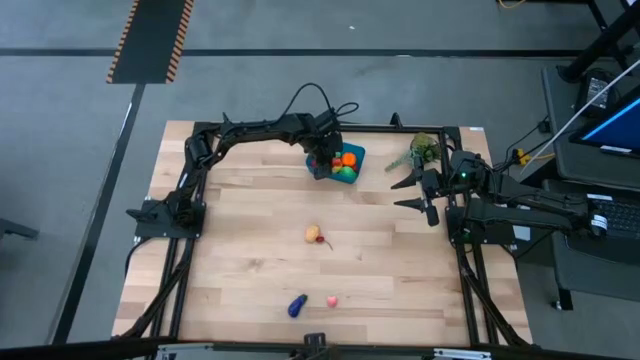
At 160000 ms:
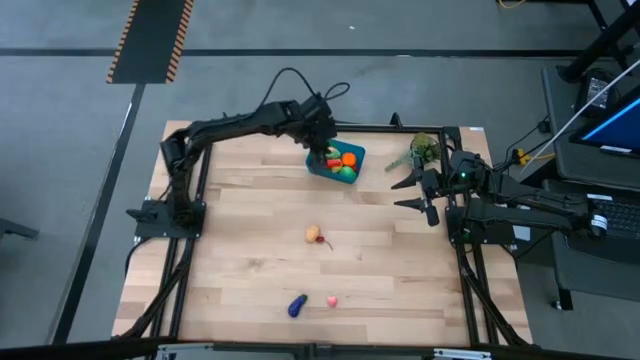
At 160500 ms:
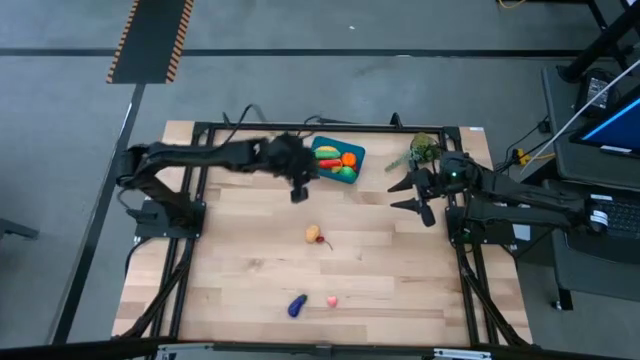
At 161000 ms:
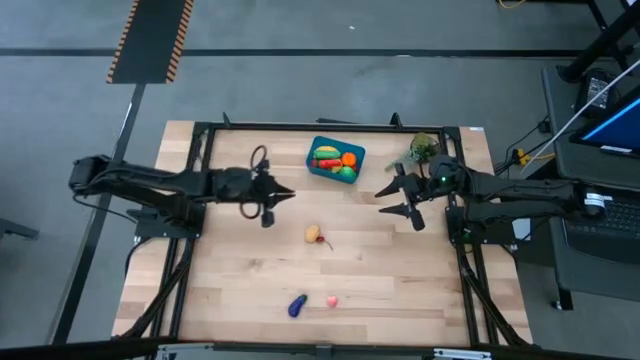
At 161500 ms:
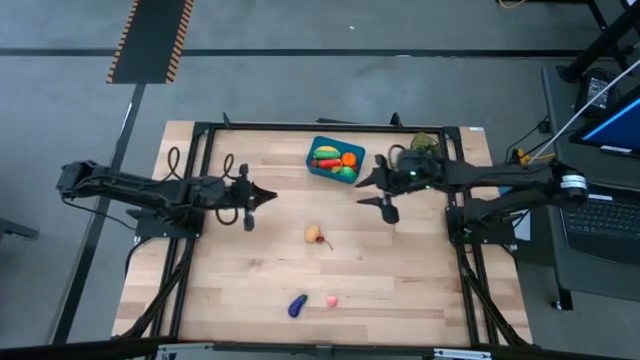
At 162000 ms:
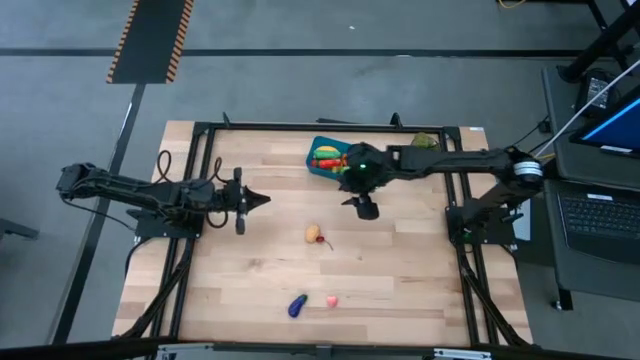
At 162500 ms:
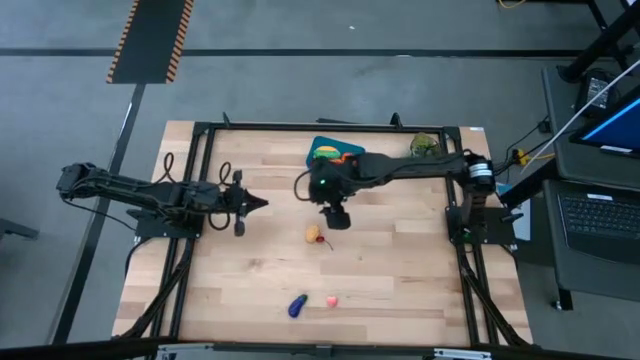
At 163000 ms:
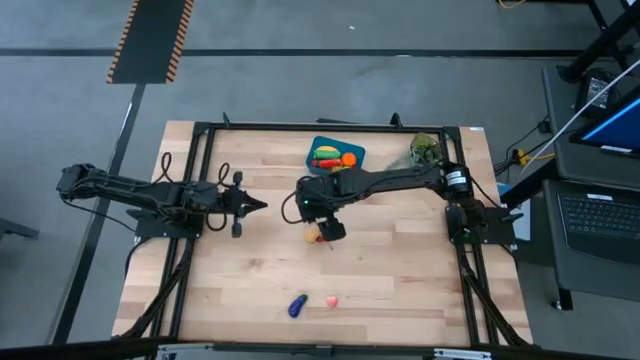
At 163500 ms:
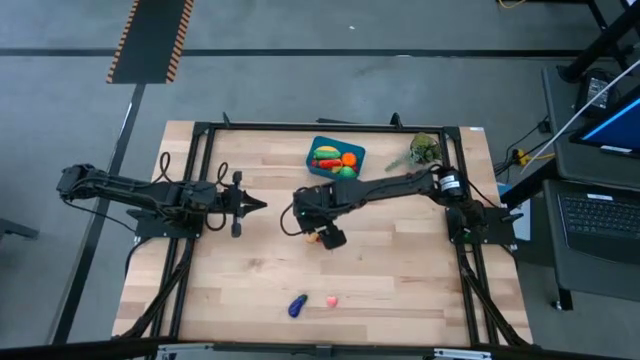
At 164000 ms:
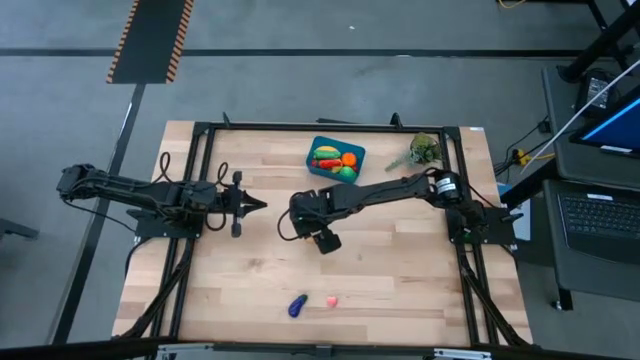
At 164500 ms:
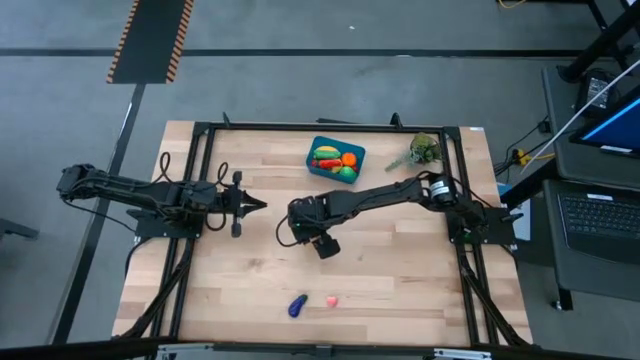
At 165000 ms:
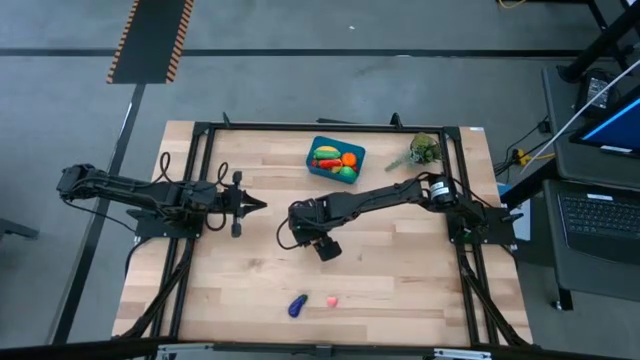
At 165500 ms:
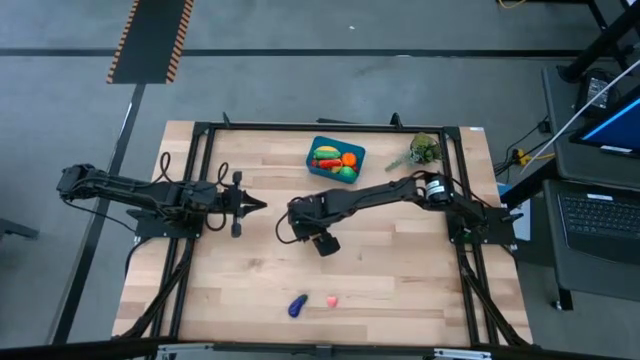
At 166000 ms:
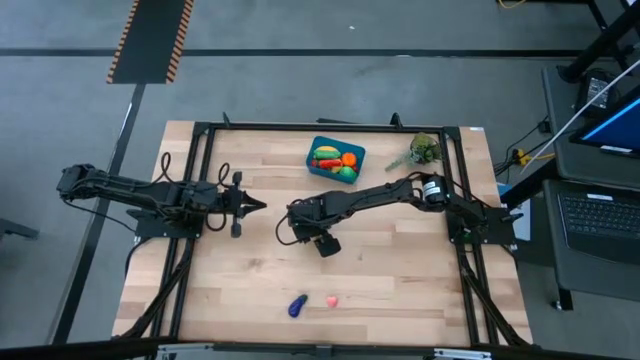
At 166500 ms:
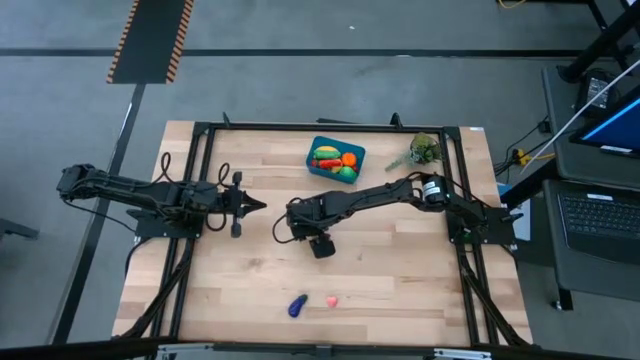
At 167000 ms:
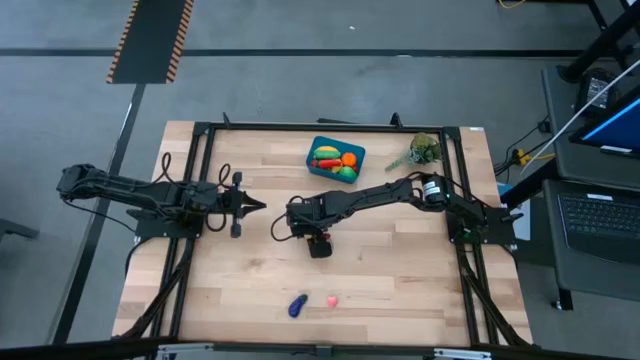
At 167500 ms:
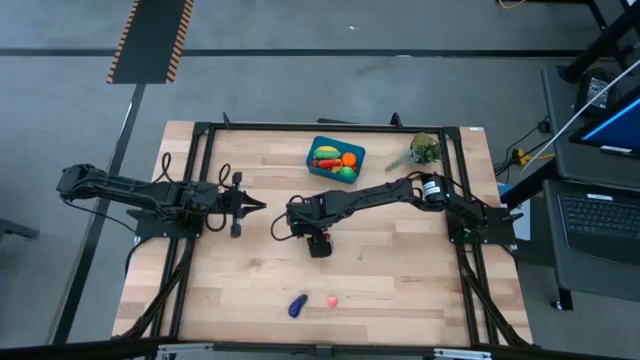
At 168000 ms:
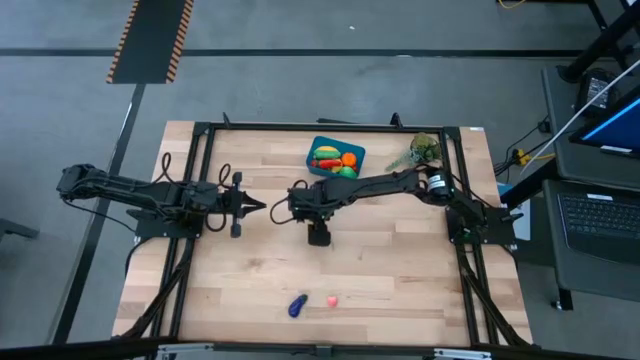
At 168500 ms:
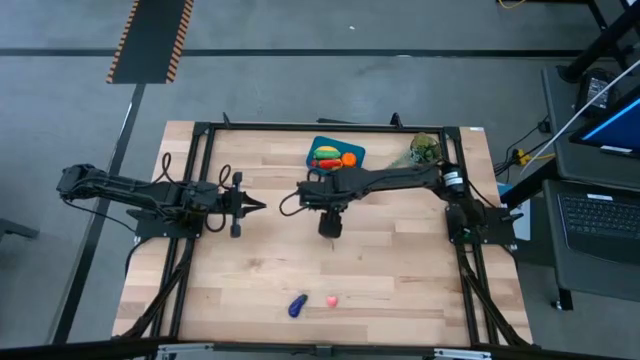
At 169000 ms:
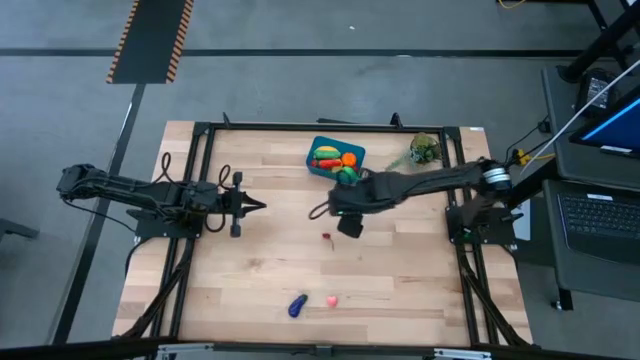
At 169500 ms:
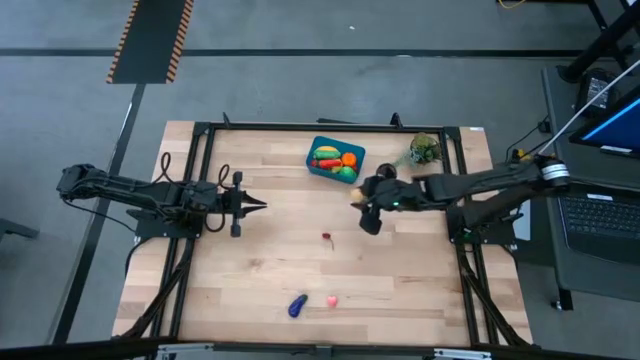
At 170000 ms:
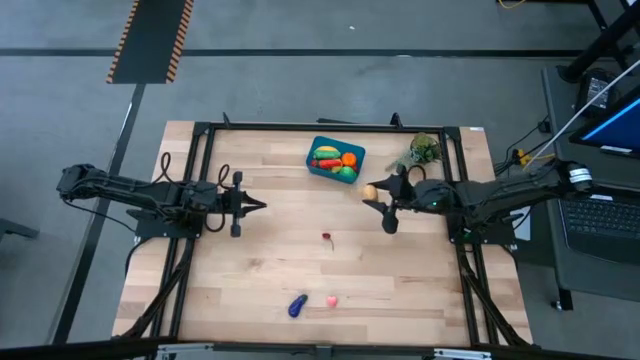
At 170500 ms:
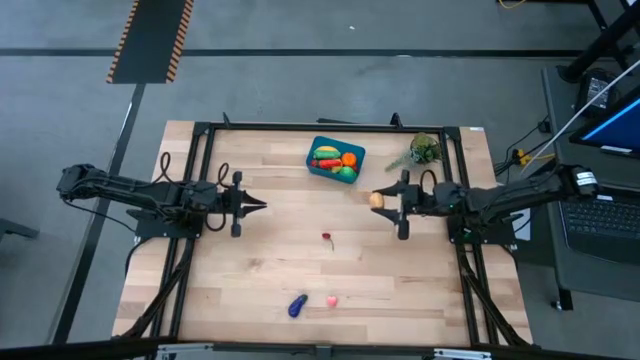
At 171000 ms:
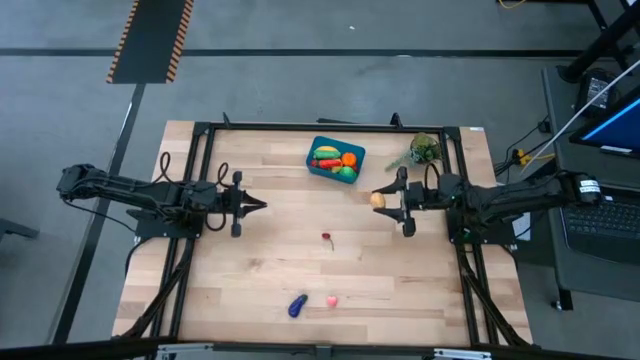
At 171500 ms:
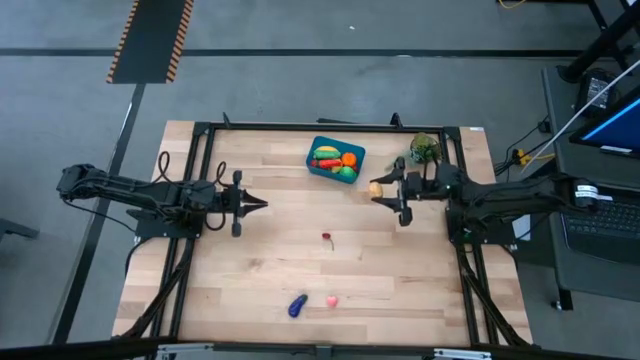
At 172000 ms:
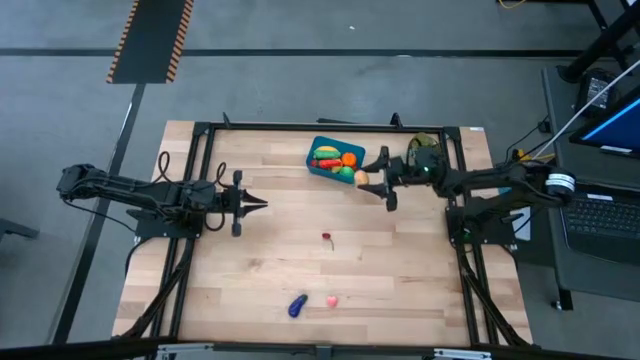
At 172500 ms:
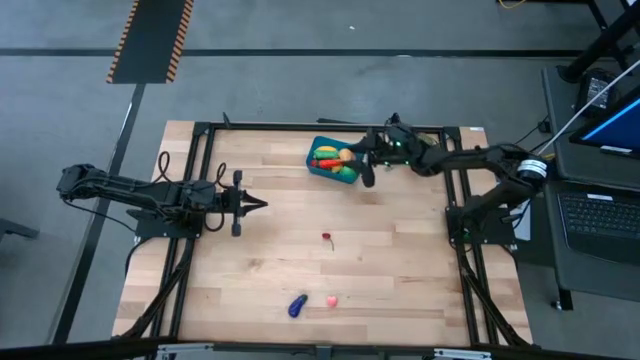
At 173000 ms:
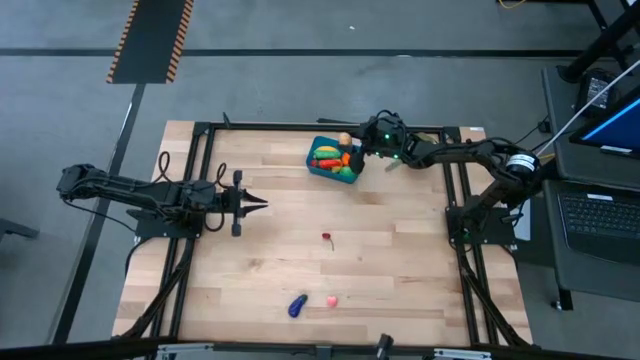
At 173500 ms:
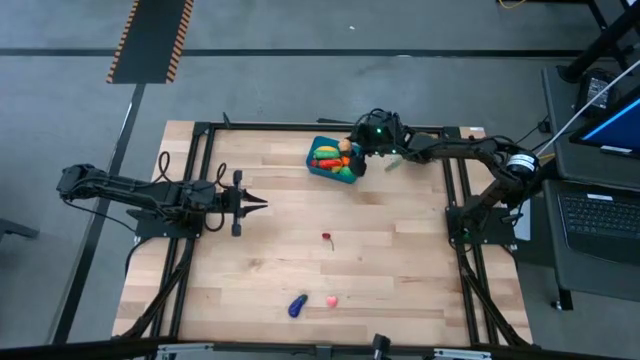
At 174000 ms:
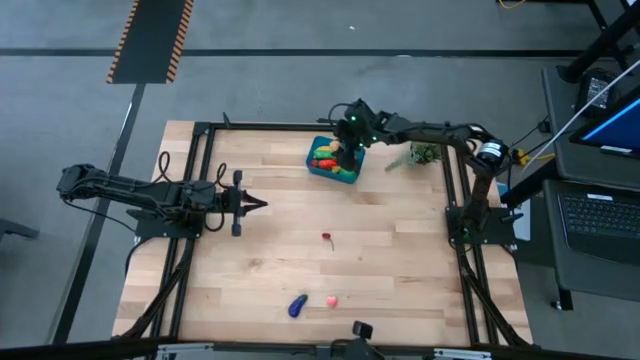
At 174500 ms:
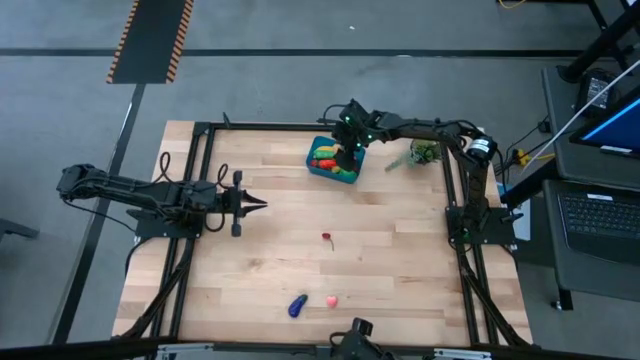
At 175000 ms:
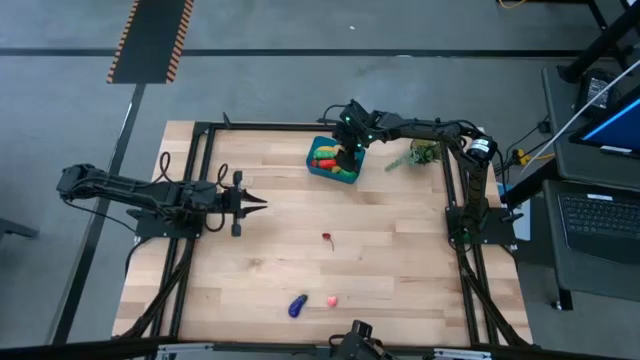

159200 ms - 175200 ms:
Task: Pick and placing Produce into tupperware
Put the brown potato into the blue bin
